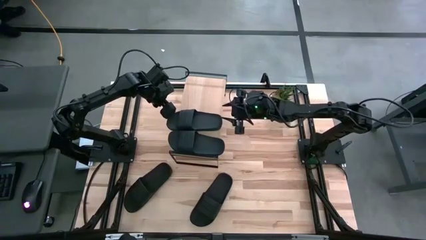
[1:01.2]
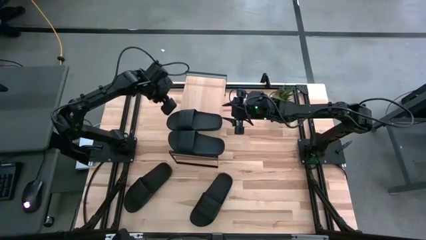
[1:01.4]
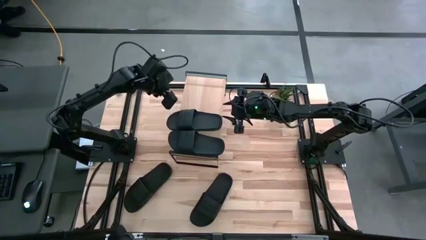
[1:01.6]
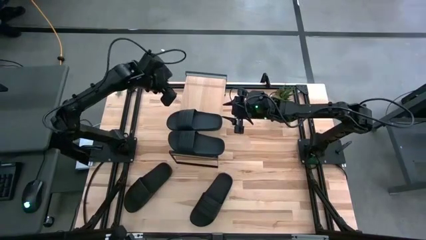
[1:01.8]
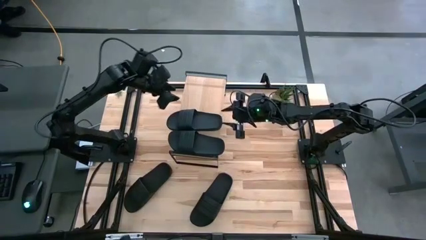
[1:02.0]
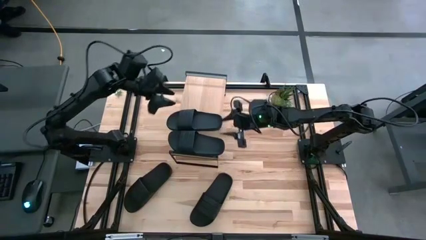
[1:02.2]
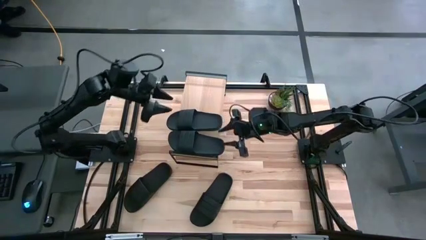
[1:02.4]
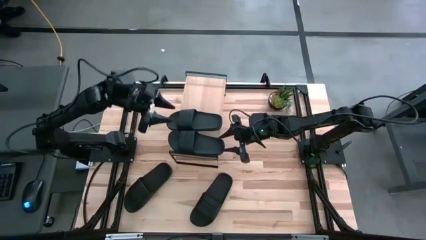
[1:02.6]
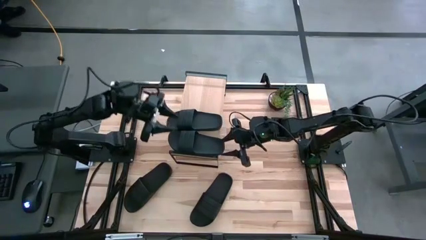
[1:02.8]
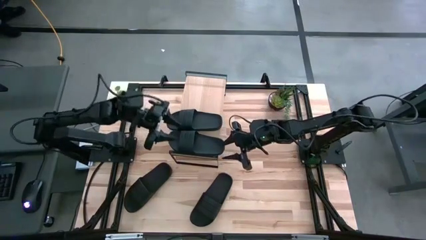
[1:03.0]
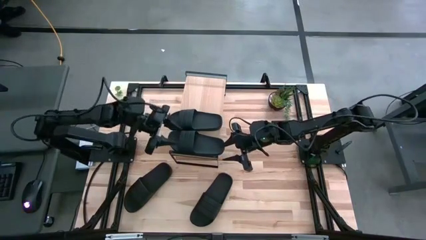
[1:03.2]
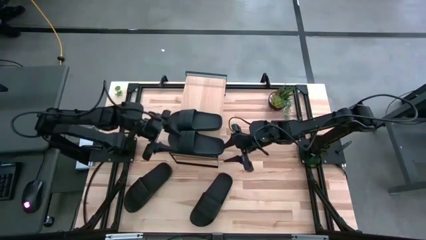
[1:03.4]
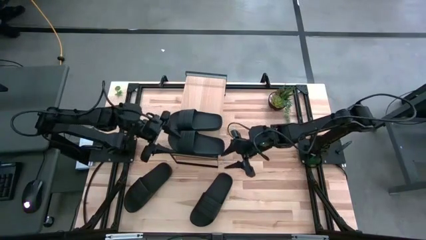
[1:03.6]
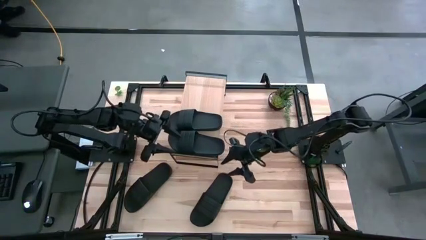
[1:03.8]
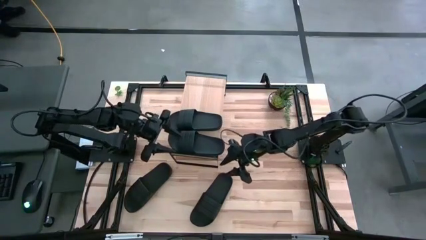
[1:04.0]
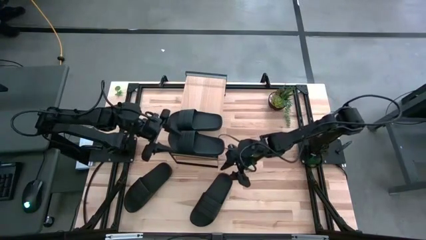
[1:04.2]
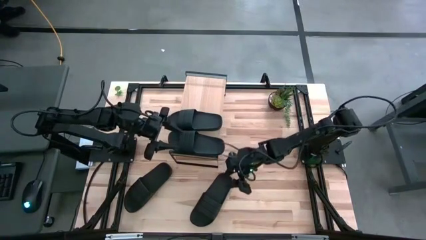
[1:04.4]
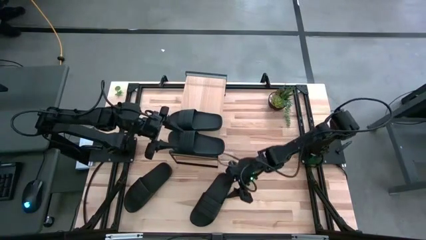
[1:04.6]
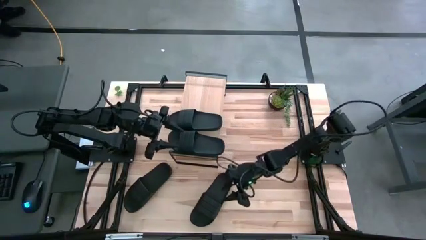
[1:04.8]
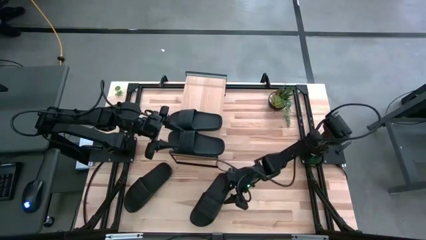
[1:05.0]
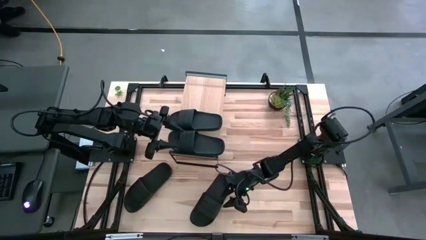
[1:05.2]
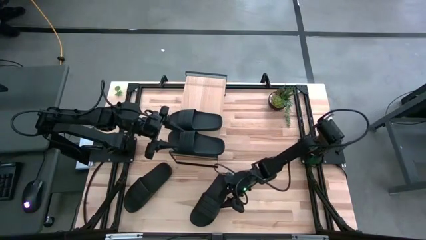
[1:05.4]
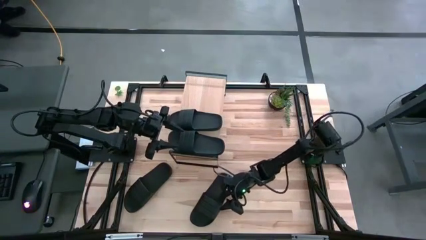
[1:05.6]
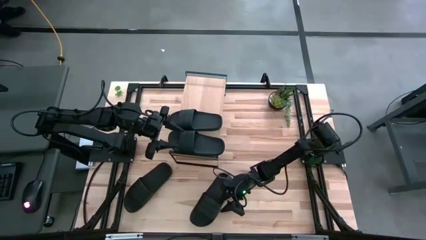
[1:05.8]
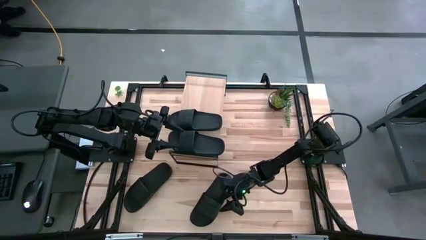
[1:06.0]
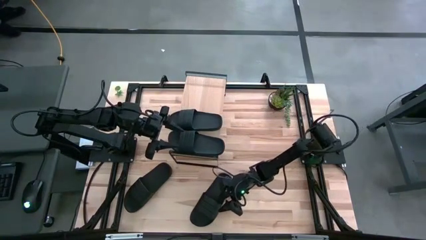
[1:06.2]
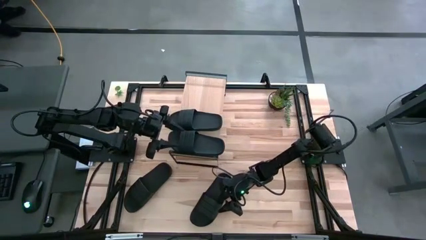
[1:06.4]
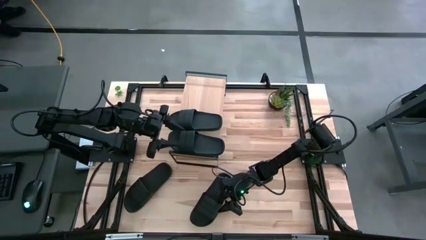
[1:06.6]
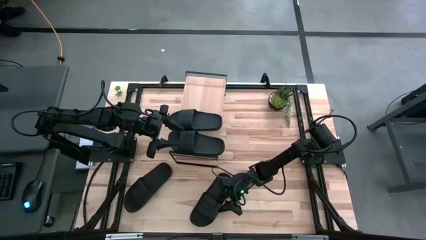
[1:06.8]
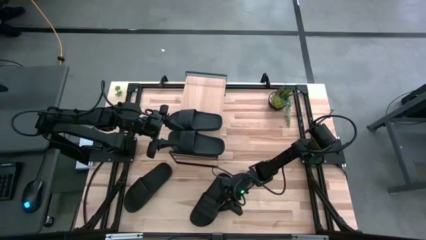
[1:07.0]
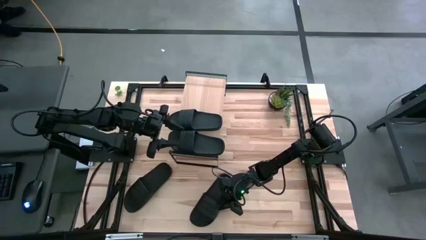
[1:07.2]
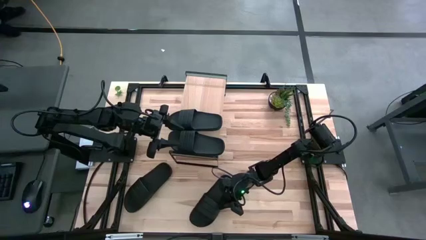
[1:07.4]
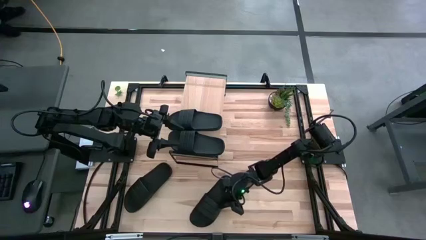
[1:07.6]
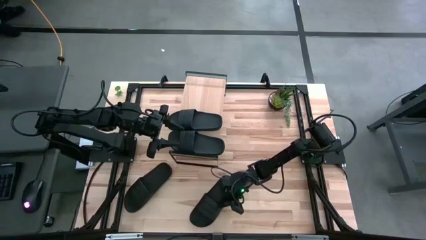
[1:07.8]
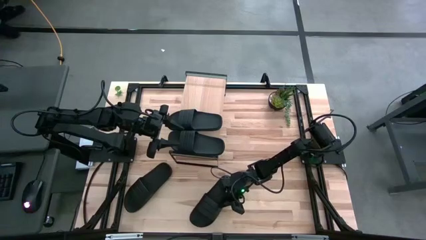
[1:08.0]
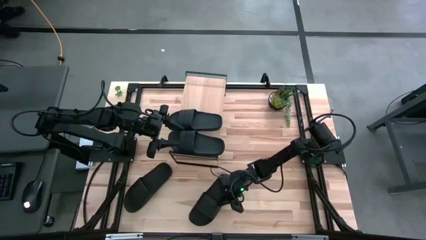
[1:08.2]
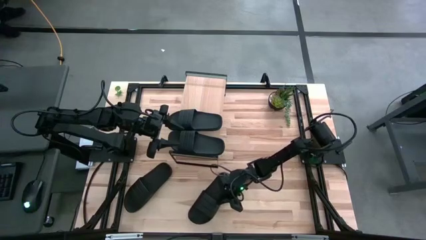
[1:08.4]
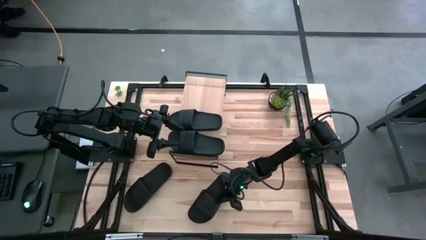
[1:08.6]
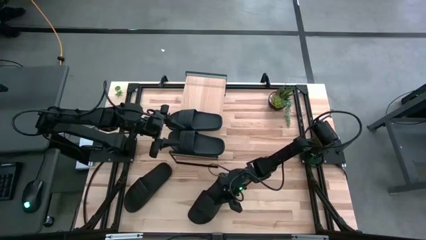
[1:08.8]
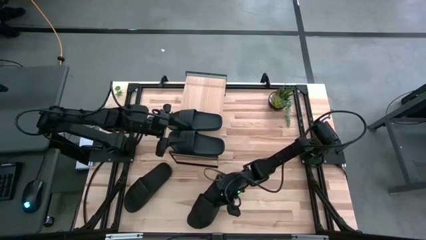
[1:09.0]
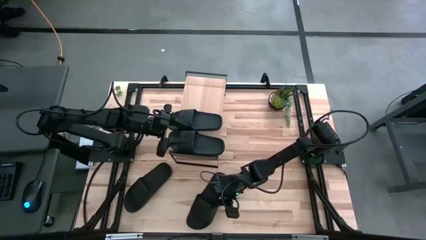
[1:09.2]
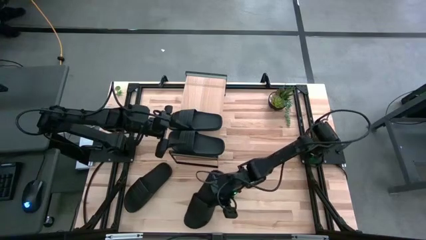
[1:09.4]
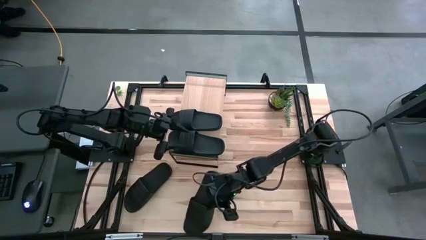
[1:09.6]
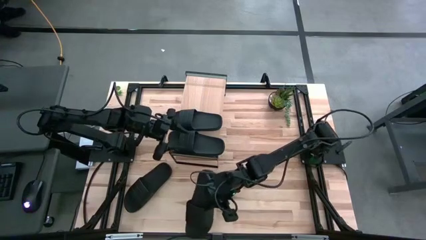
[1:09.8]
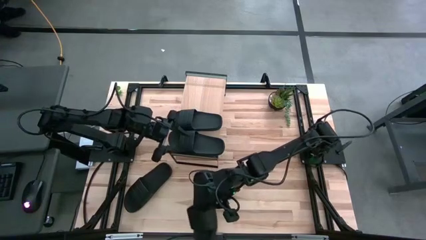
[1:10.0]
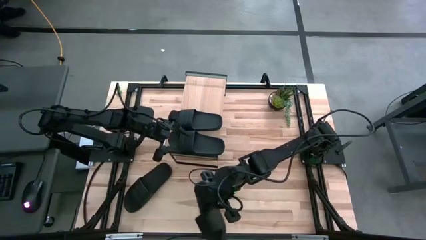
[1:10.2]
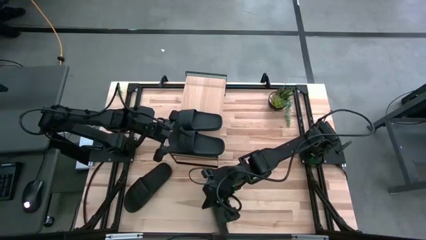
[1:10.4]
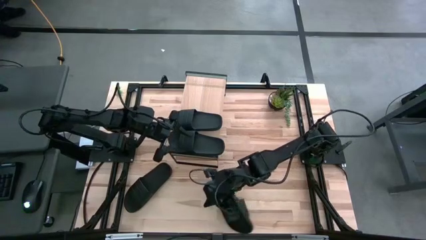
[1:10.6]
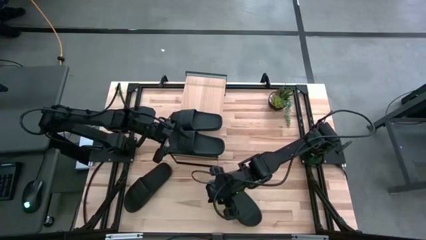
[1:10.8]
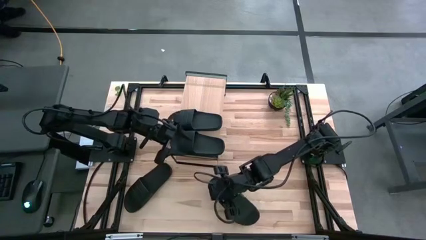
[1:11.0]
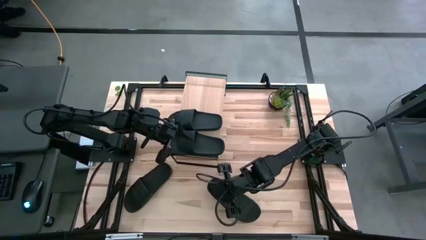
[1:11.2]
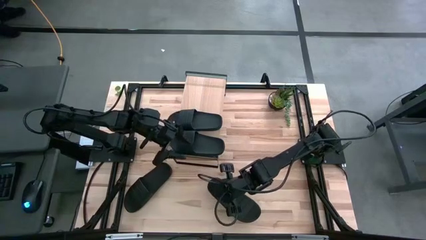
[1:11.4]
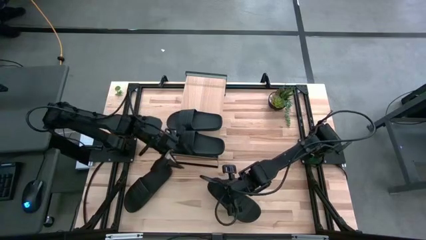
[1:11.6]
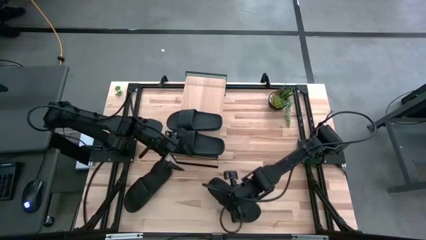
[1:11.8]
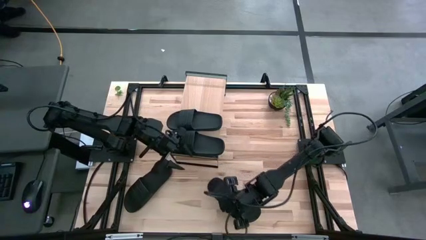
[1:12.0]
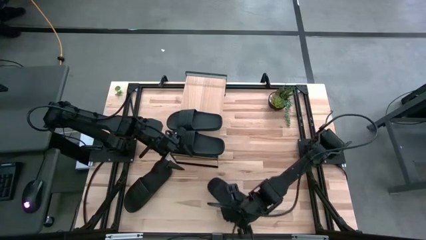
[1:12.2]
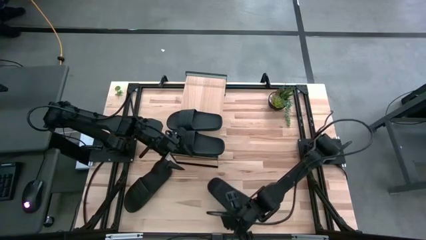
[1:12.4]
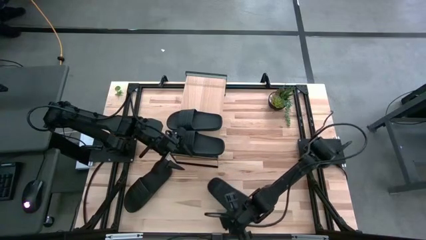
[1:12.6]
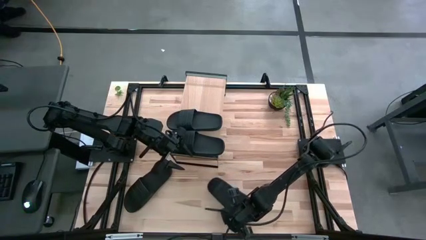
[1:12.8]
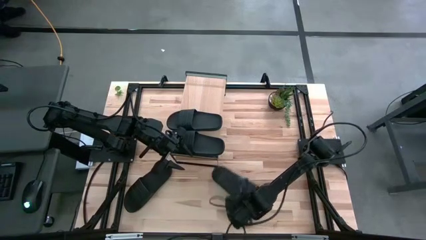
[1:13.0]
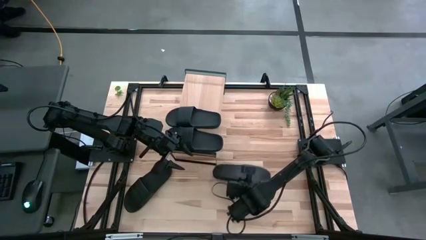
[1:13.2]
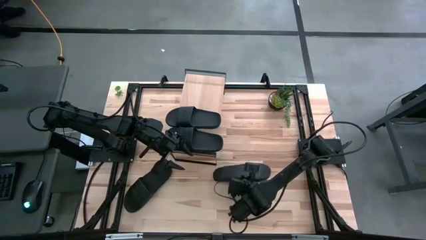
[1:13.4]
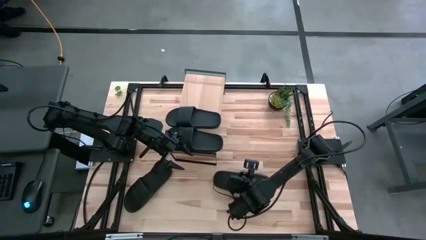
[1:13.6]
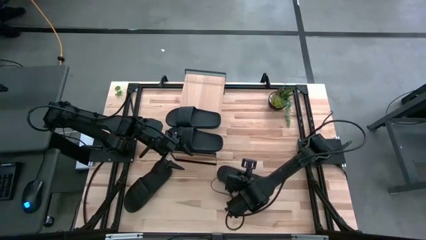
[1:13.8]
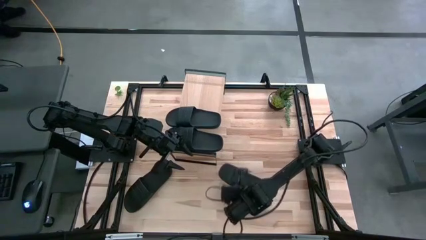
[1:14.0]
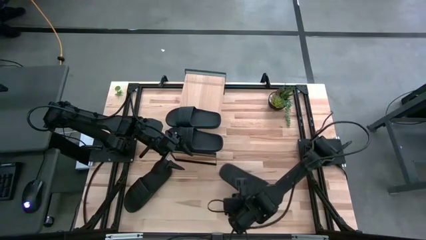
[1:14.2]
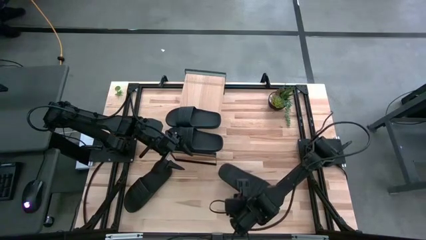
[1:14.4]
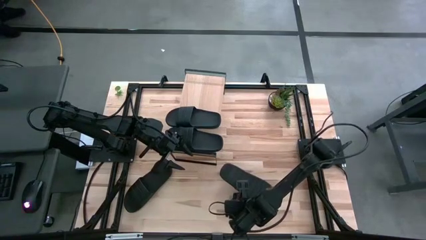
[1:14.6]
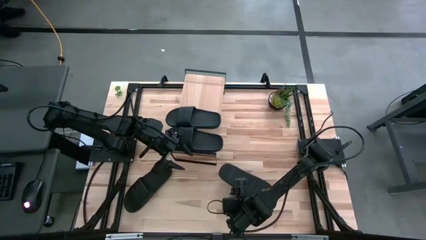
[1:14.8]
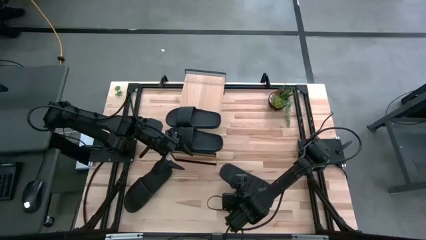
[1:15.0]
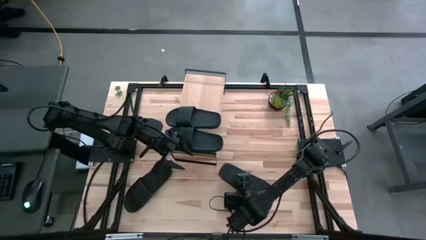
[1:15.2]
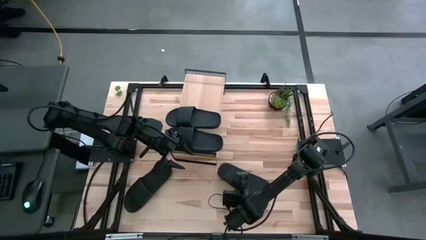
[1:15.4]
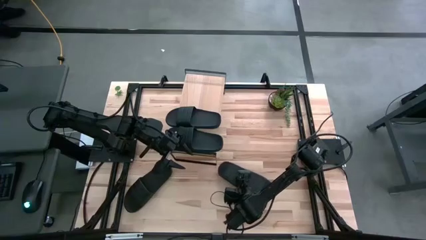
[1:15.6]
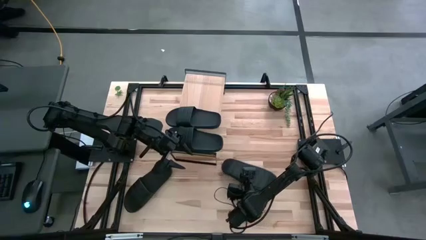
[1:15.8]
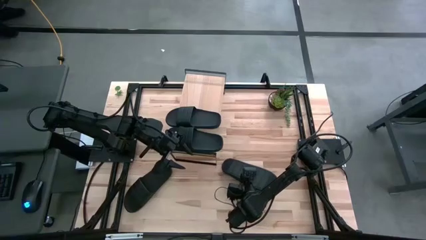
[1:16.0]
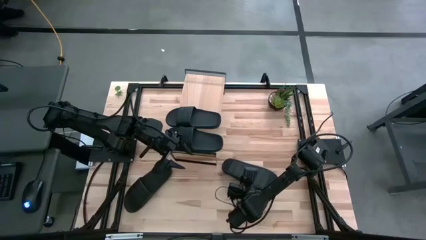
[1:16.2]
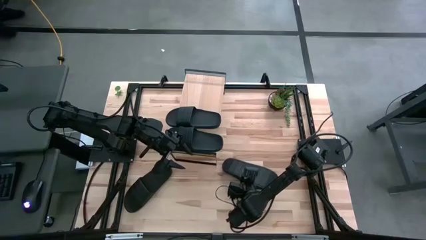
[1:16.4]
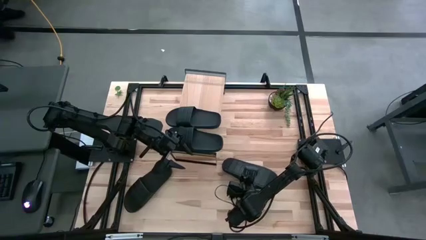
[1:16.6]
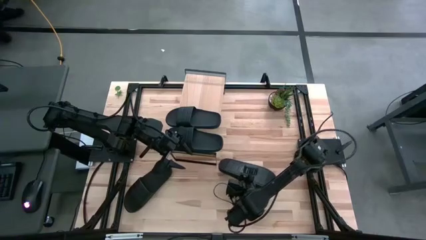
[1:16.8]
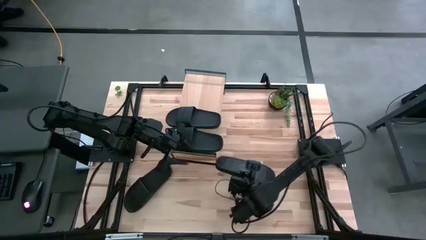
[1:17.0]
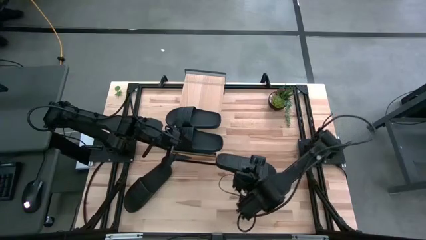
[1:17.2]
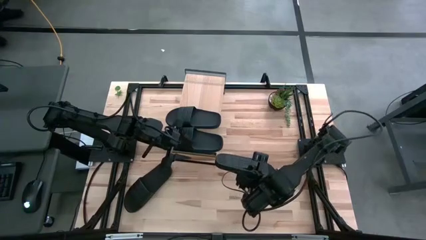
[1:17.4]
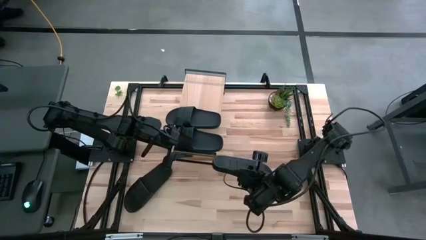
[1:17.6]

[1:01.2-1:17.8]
Task: Pick and place slides into the shelf
Put the right slipper on the shelf
